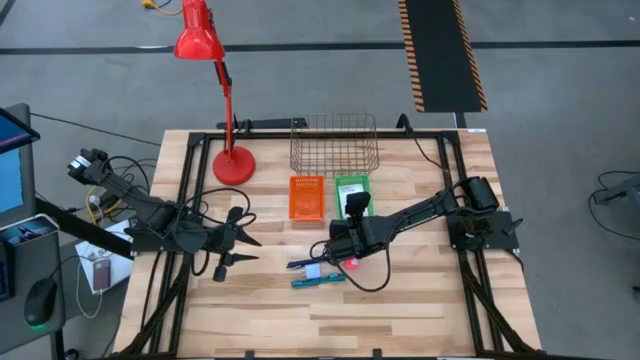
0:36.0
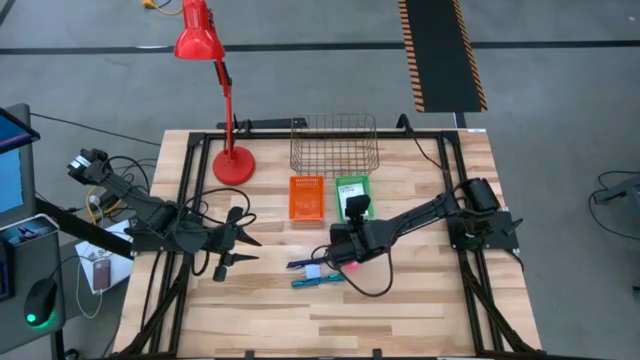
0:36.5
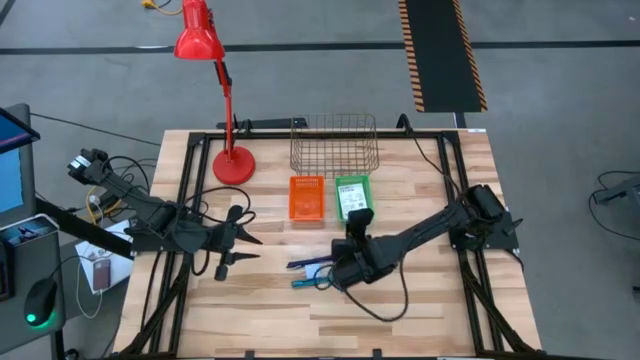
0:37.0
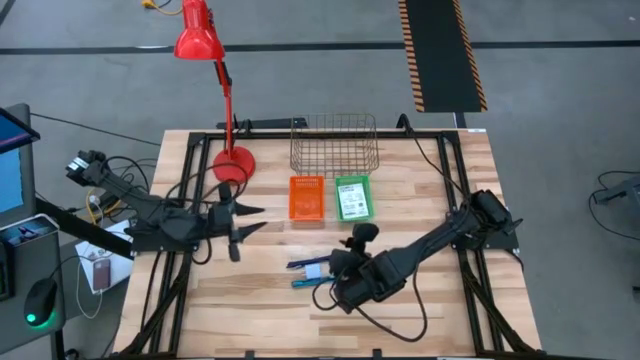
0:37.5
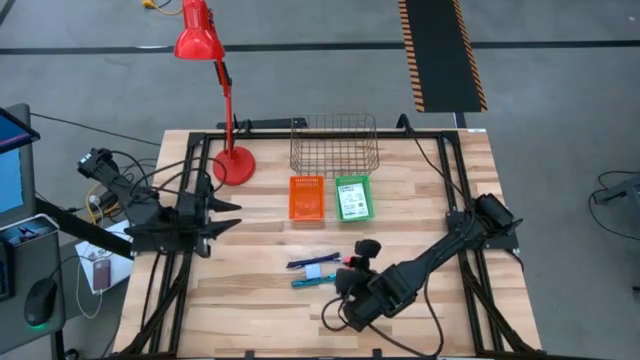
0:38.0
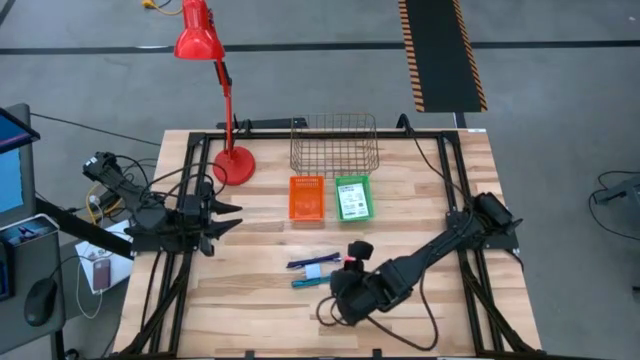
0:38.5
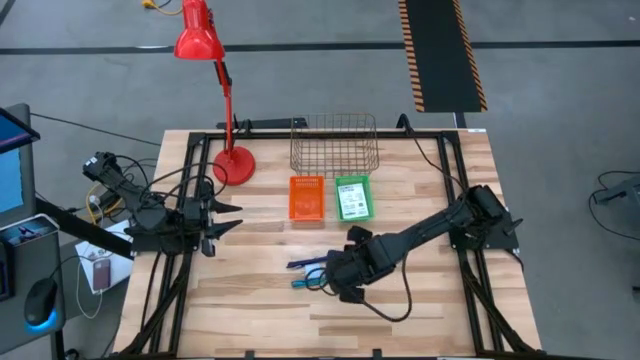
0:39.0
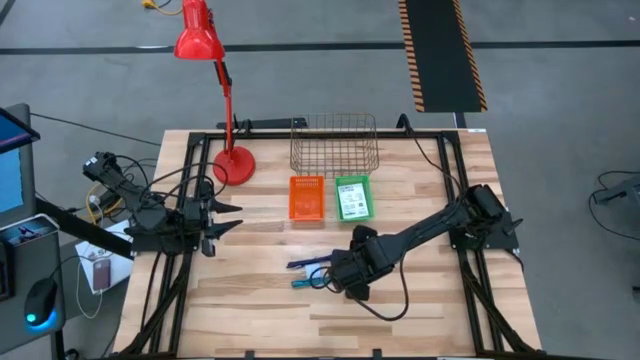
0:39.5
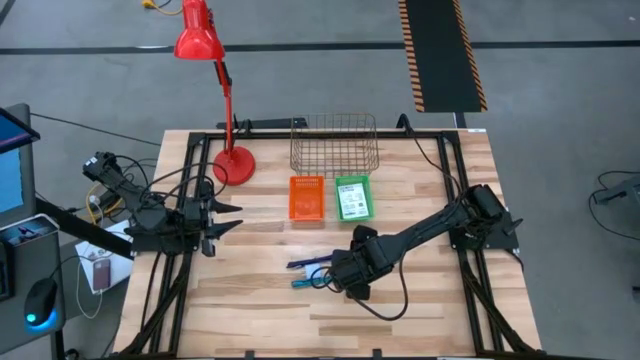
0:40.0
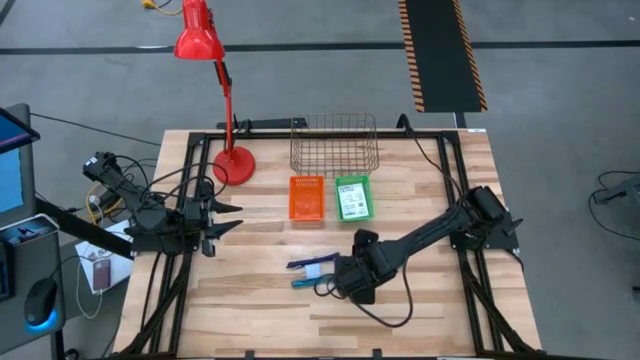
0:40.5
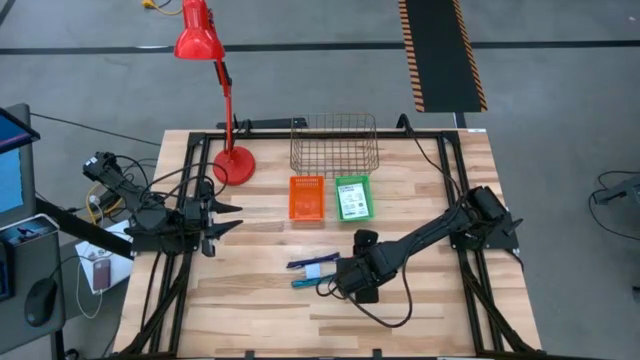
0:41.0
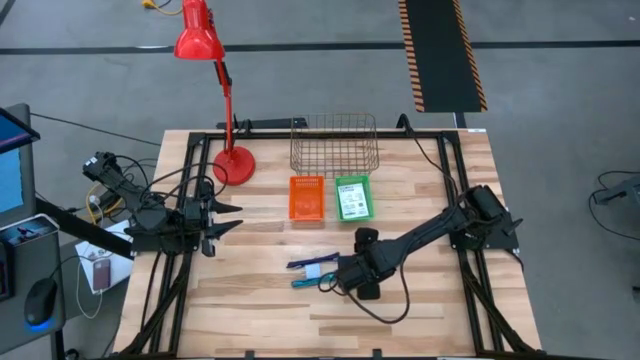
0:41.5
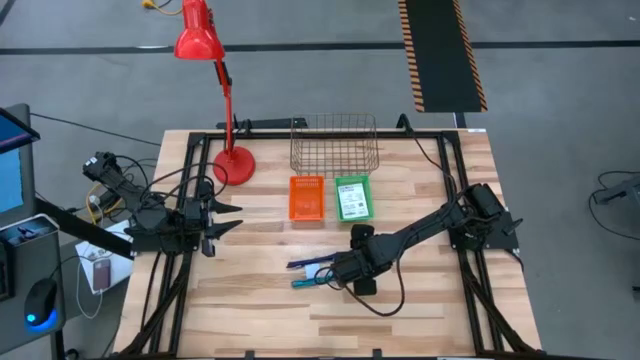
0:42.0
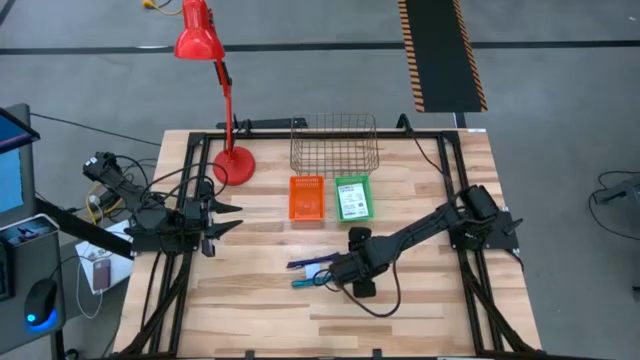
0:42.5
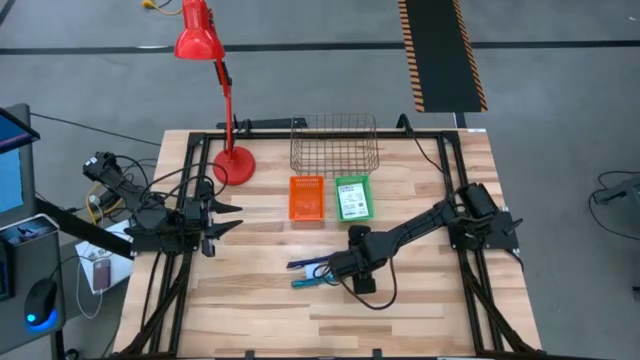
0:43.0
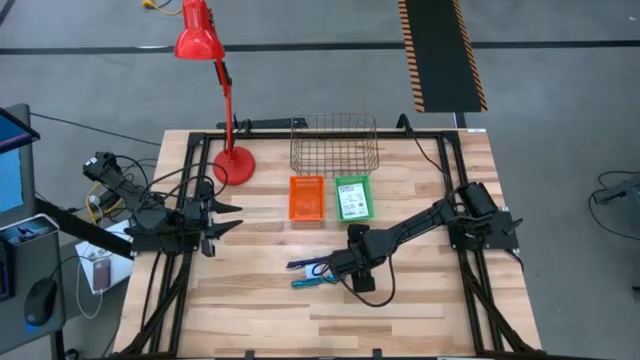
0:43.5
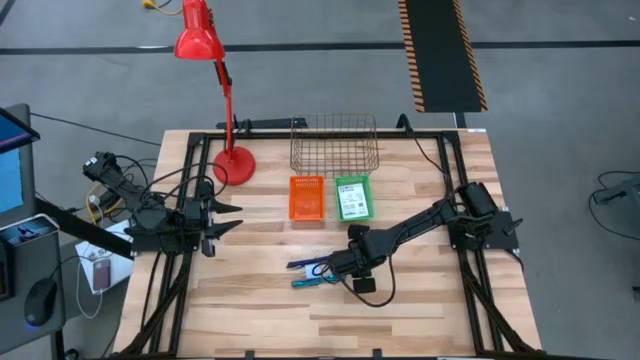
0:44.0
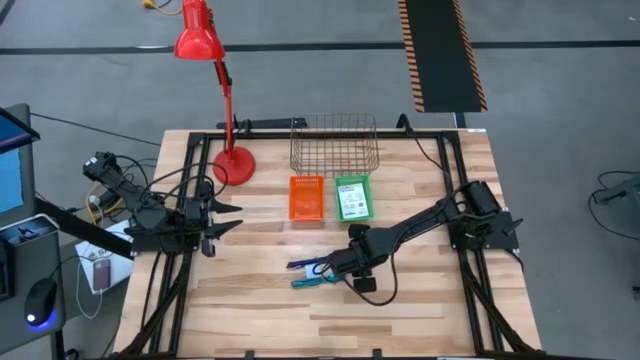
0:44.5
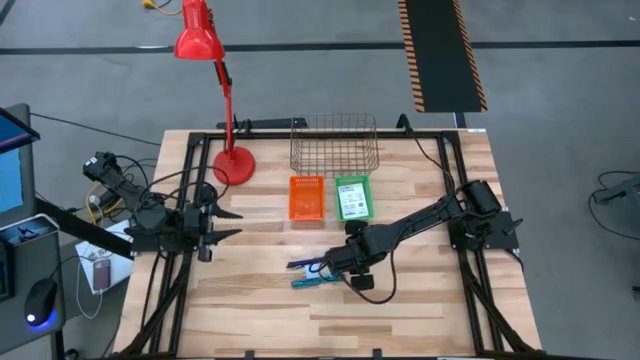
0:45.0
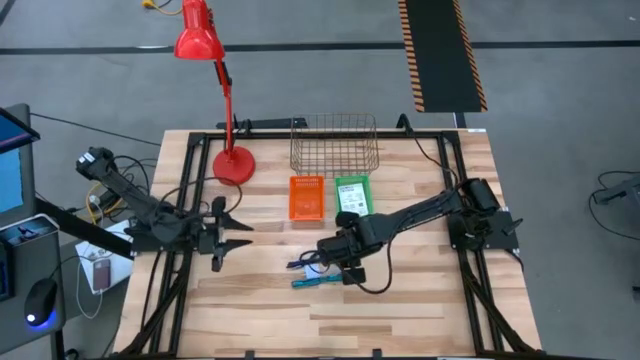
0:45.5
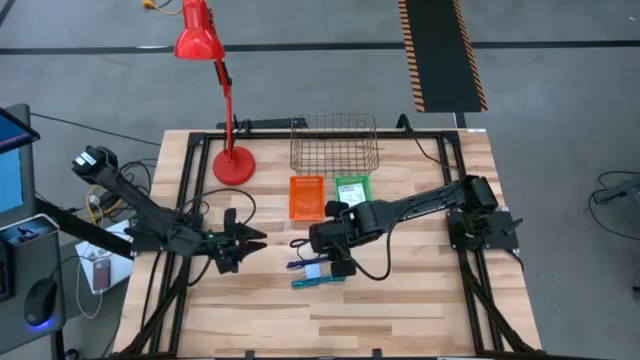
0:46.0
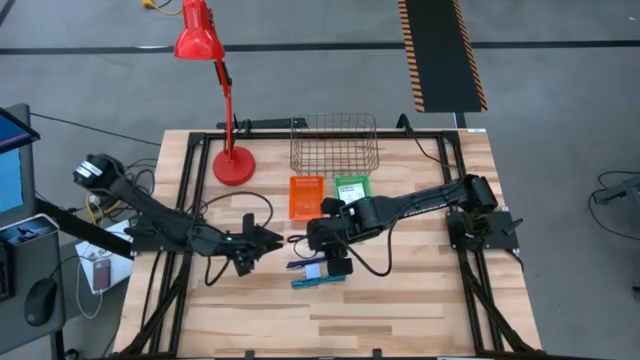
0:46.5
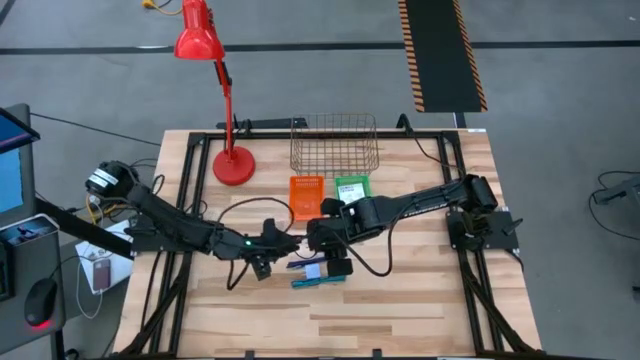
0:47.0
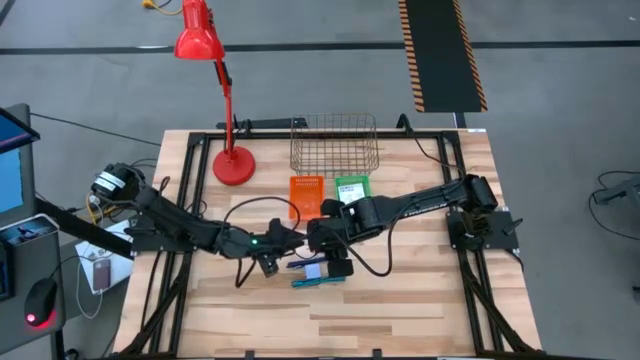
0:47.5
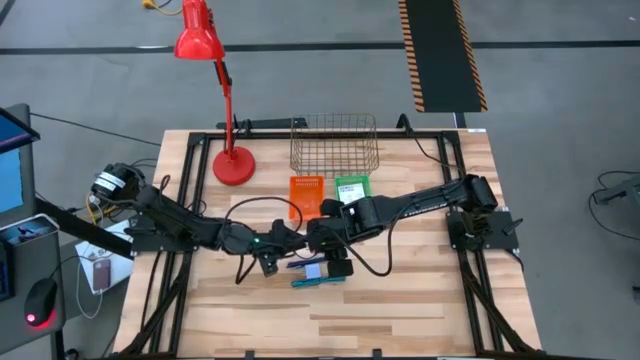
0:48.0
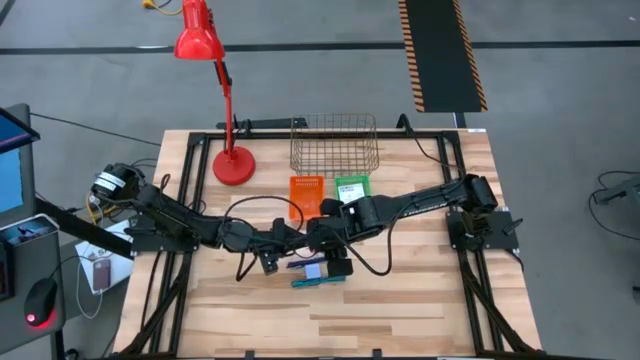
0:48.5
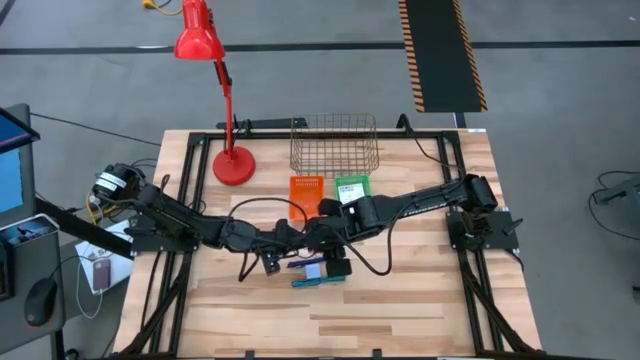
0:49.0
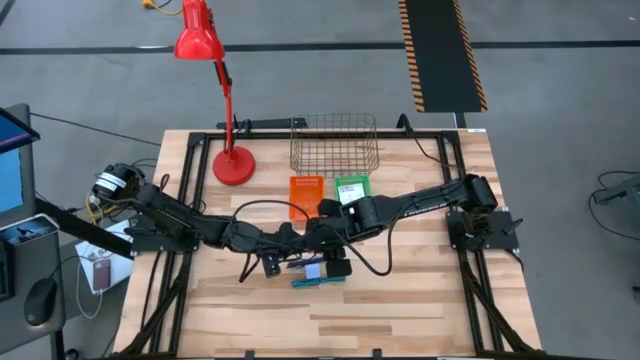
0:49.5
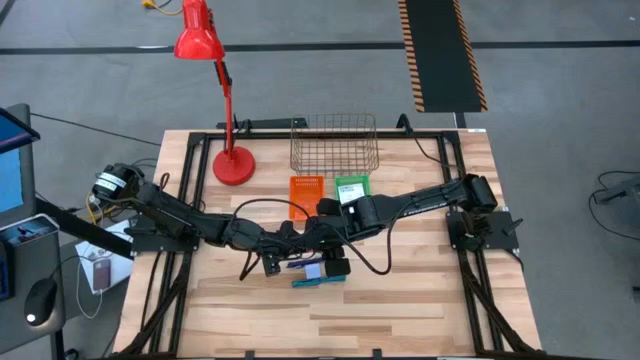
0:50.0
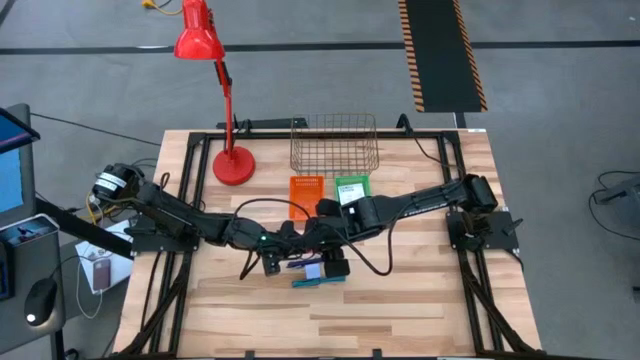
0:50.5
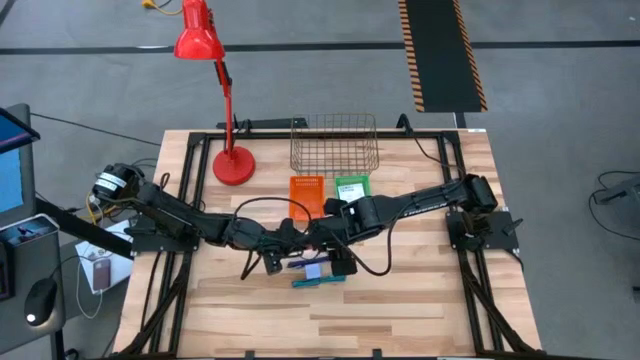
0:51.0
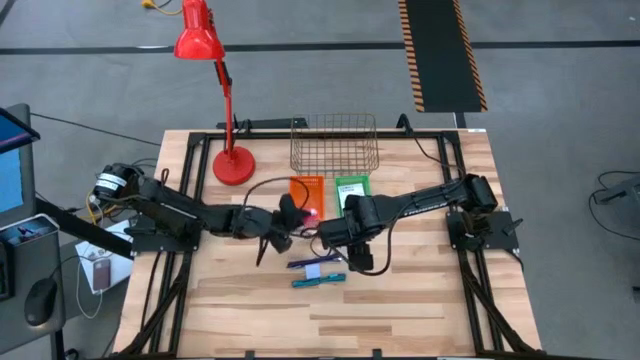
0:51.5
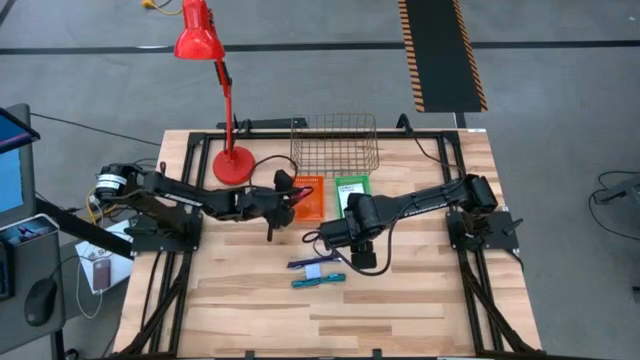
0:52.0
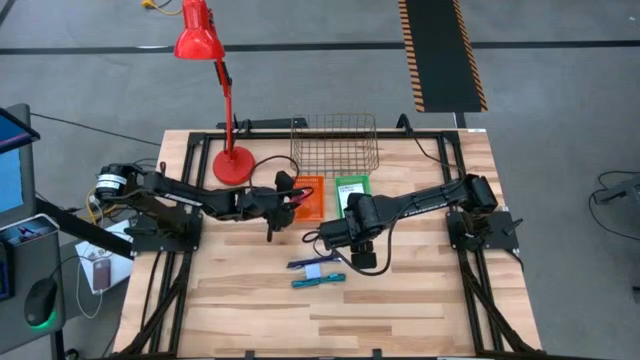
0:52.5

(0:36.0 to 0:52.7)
Task: Pick and place items into bin
Put the pink charger adapter into the orange bin

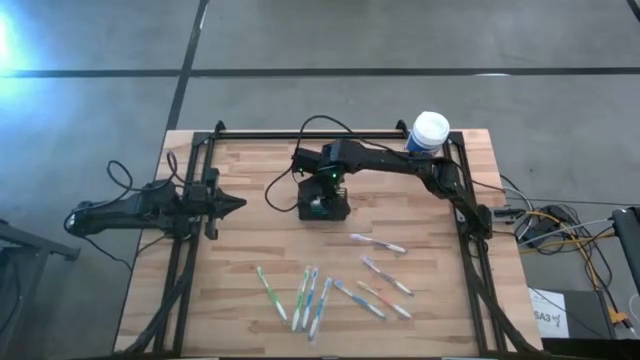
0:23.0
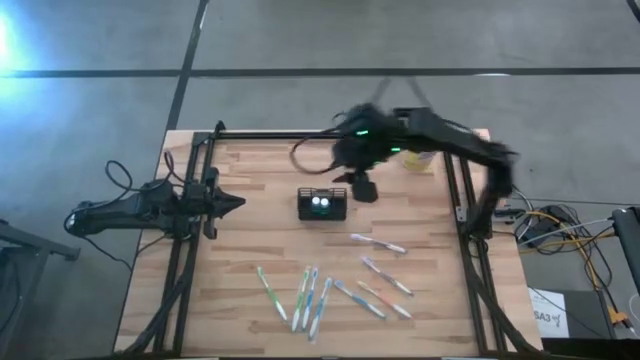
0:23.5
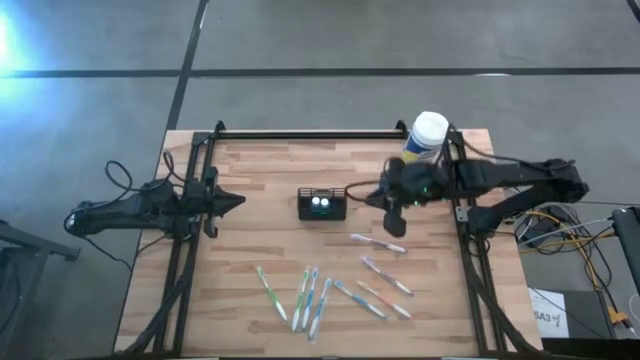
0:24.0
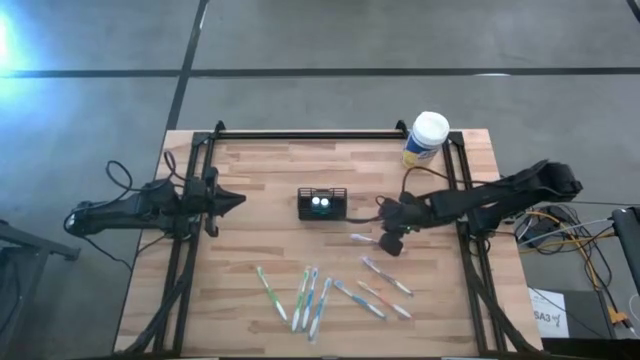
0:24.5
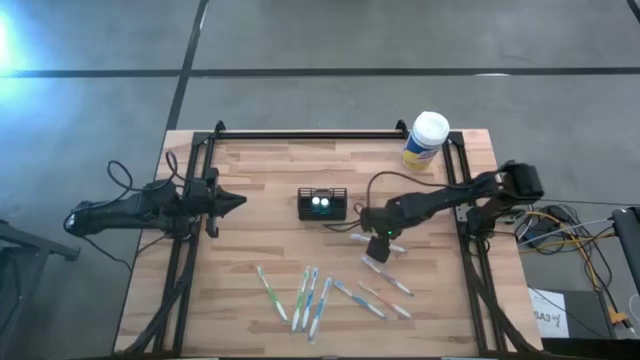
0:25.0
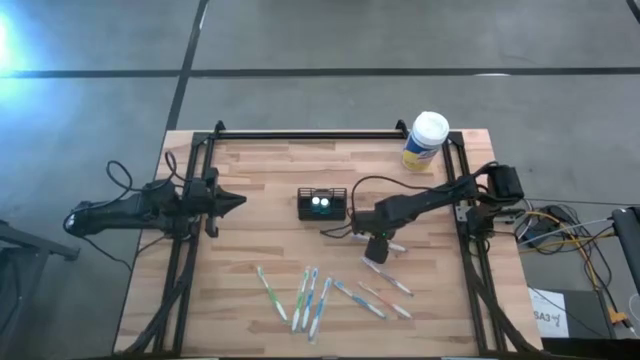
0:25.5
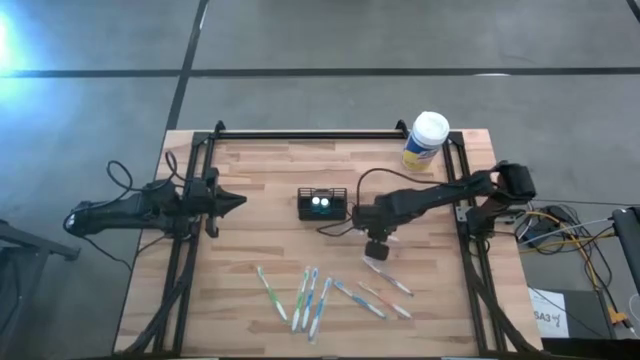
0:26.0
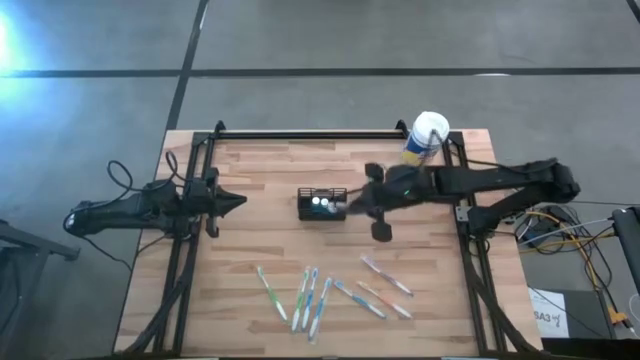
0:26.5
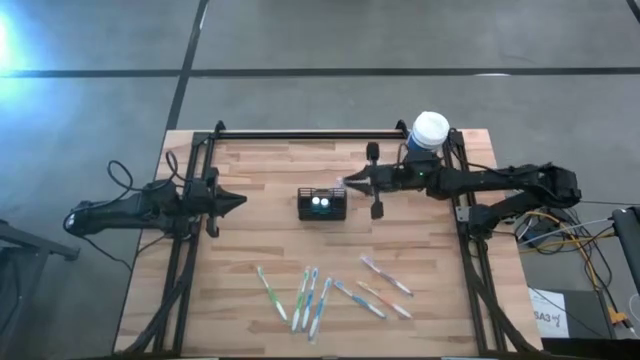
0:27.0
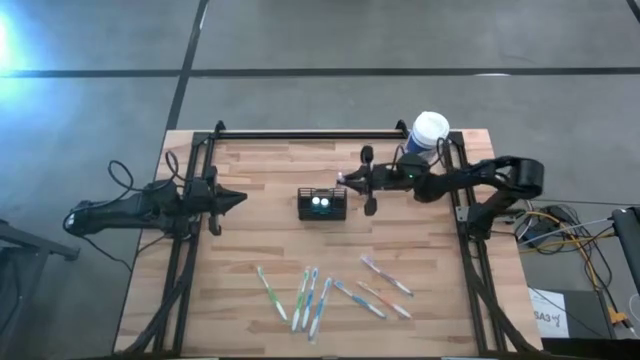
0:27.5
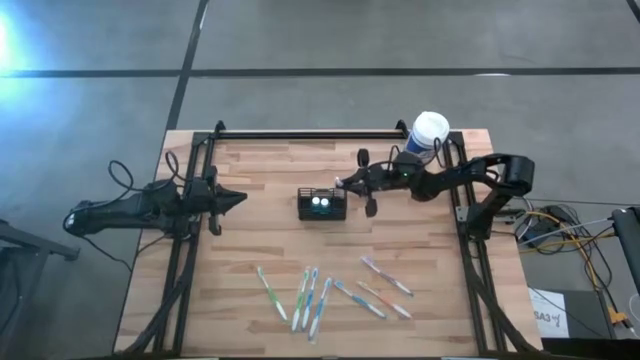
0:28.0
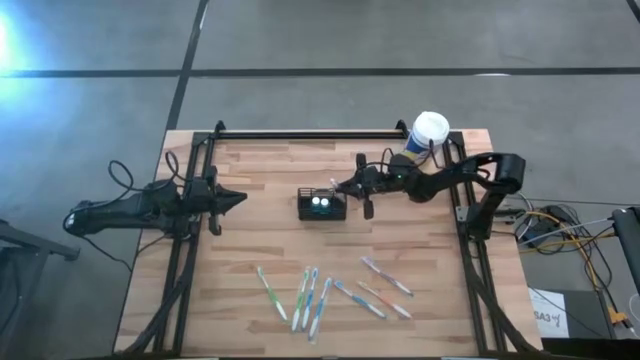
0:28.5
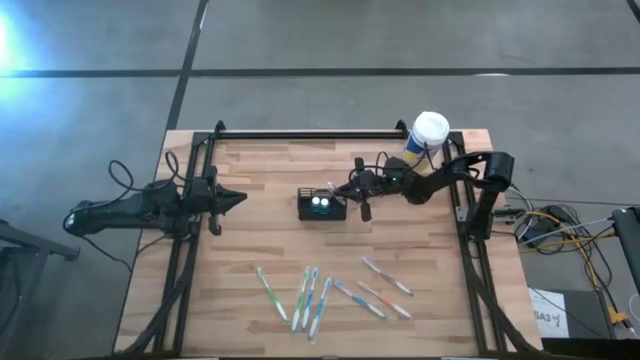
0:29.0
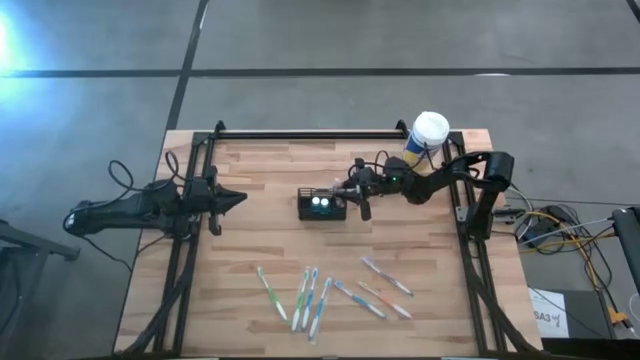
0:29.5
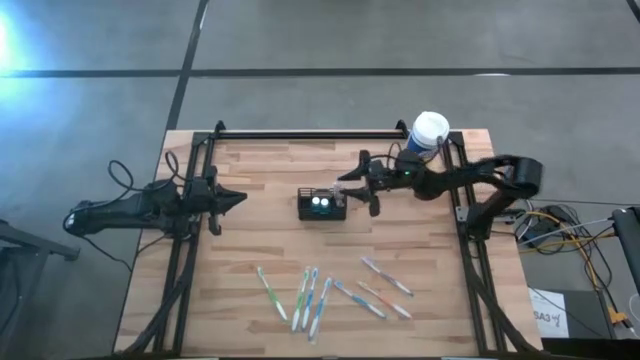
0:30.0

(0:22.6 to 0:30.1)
Task: Pick & Place toothbrushing station
Put the top purple toothbrush in the wire organizer
